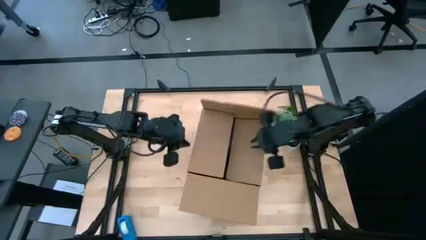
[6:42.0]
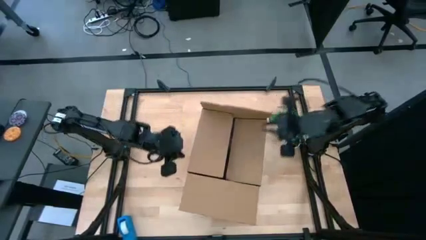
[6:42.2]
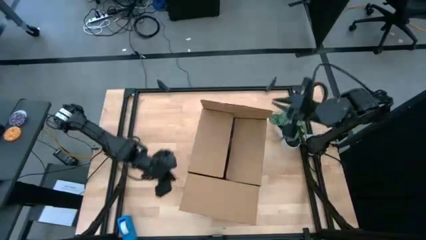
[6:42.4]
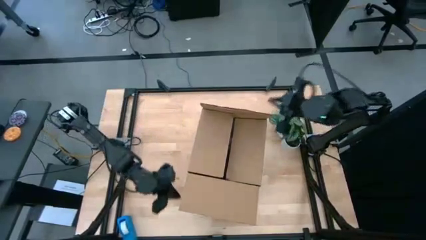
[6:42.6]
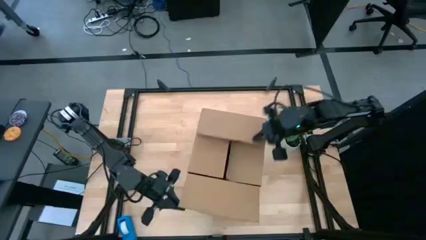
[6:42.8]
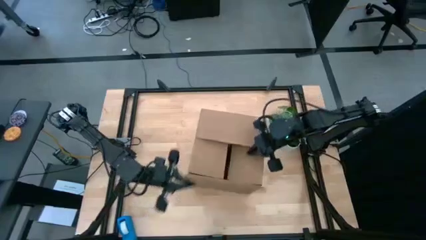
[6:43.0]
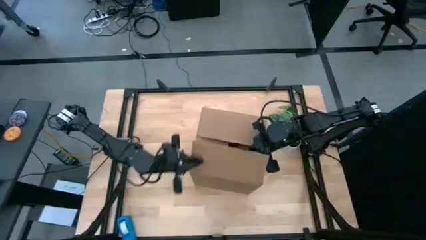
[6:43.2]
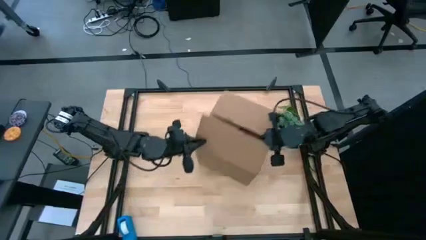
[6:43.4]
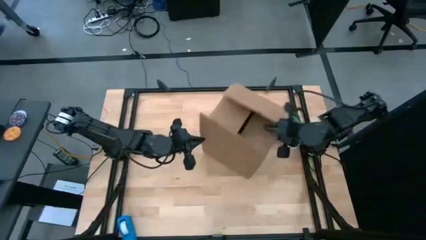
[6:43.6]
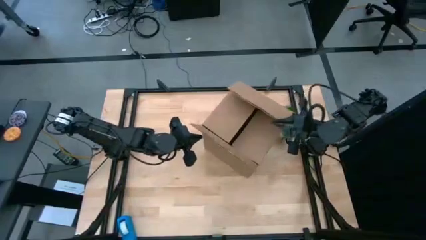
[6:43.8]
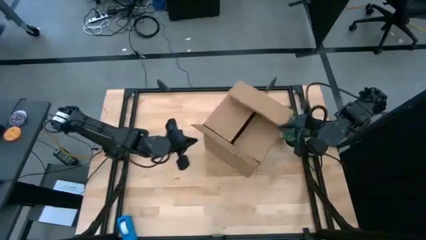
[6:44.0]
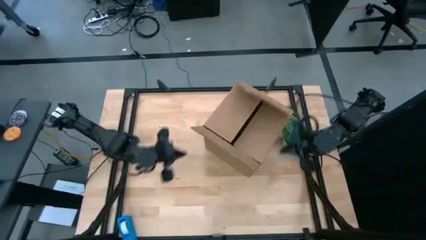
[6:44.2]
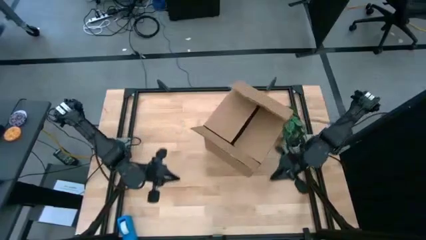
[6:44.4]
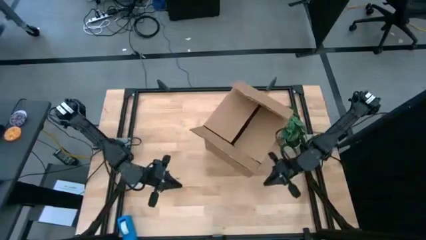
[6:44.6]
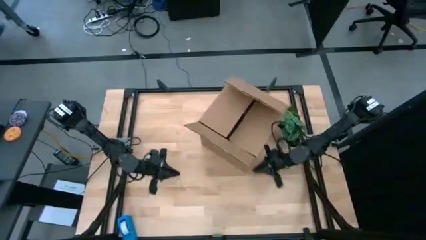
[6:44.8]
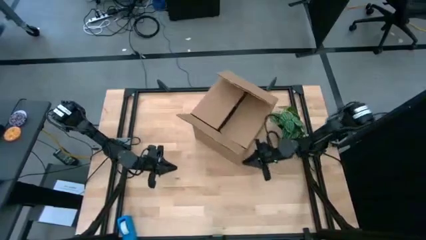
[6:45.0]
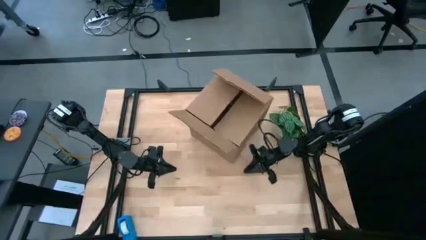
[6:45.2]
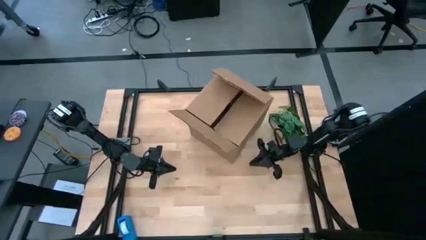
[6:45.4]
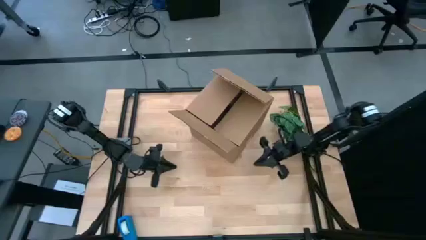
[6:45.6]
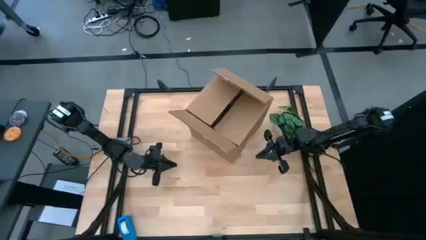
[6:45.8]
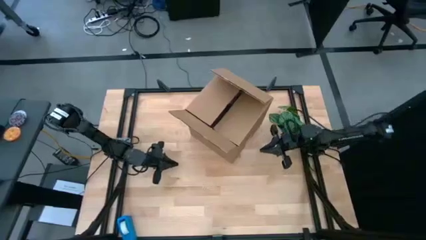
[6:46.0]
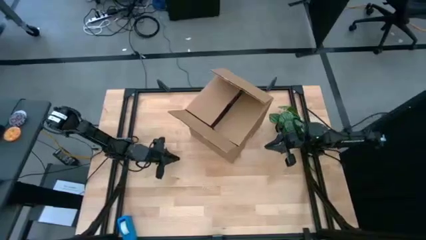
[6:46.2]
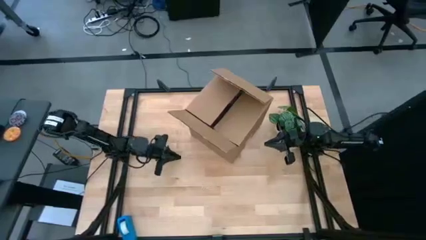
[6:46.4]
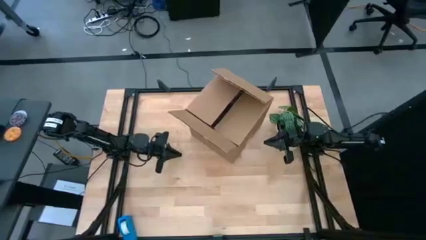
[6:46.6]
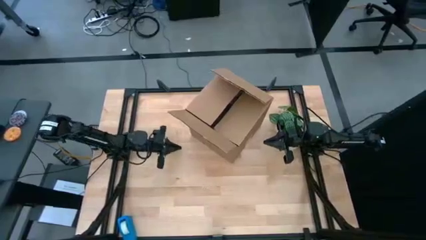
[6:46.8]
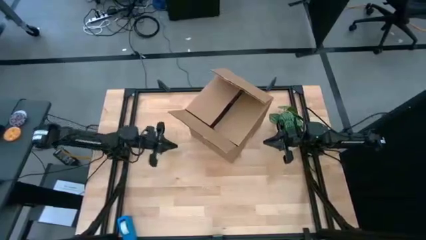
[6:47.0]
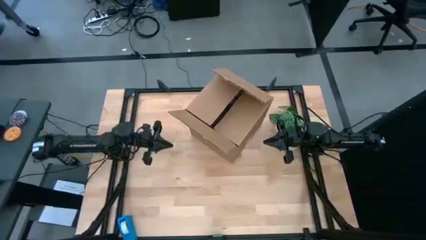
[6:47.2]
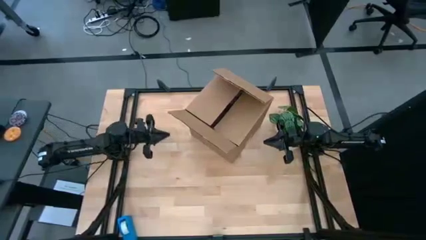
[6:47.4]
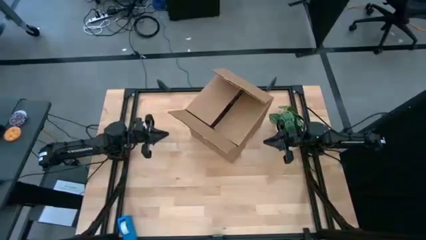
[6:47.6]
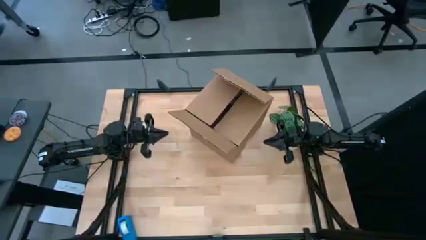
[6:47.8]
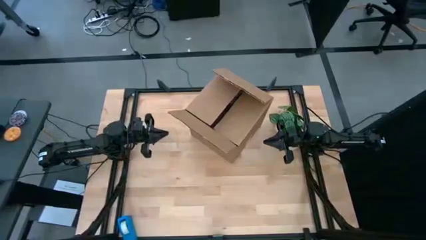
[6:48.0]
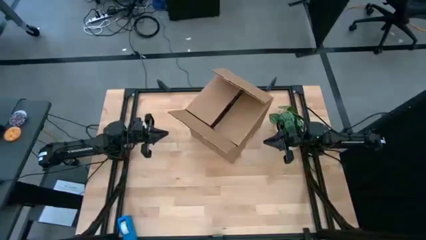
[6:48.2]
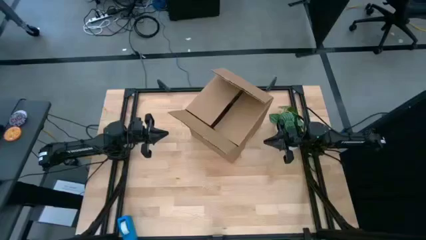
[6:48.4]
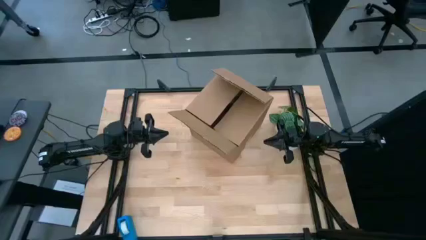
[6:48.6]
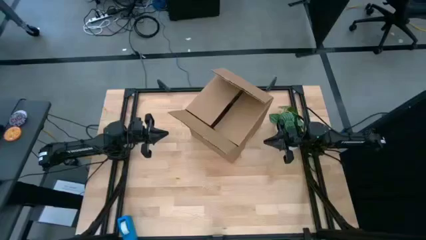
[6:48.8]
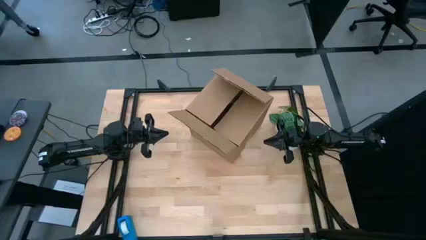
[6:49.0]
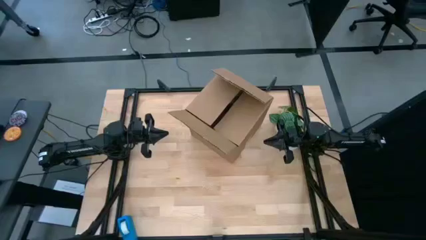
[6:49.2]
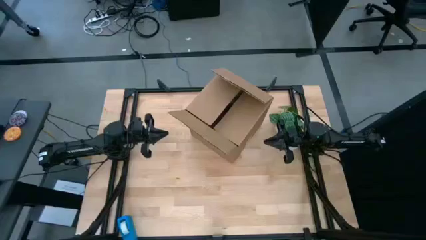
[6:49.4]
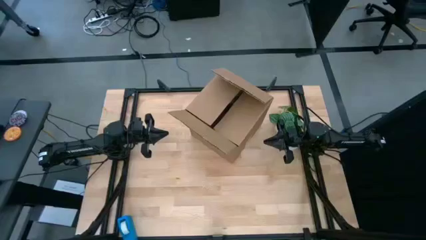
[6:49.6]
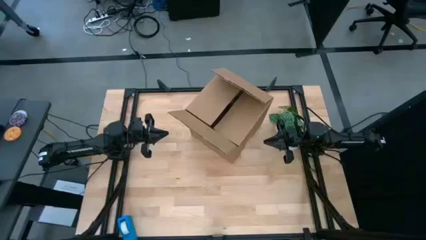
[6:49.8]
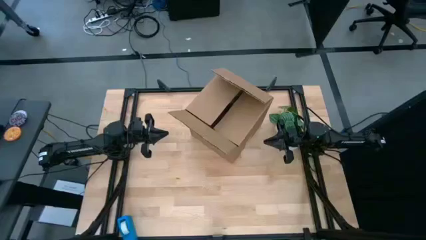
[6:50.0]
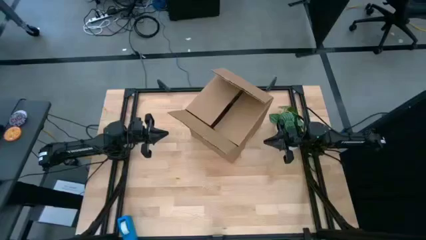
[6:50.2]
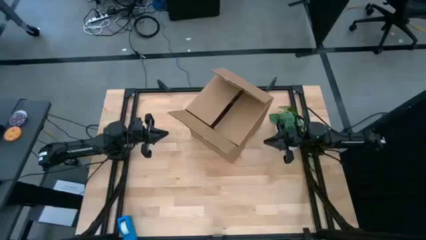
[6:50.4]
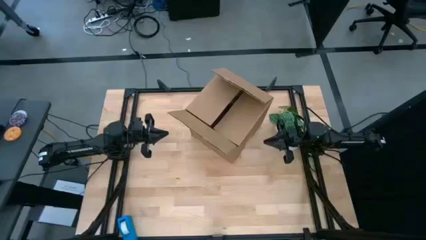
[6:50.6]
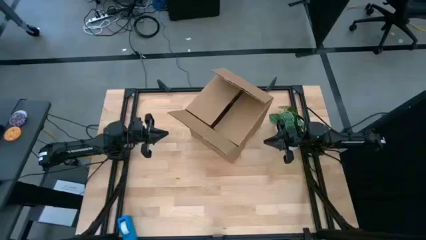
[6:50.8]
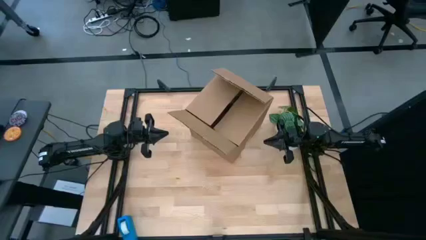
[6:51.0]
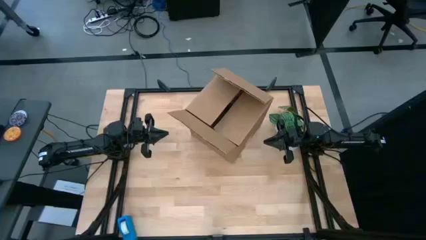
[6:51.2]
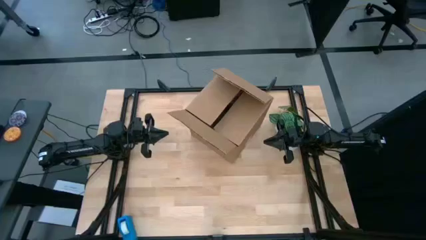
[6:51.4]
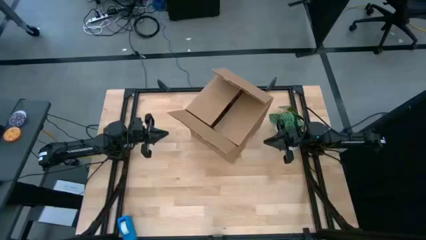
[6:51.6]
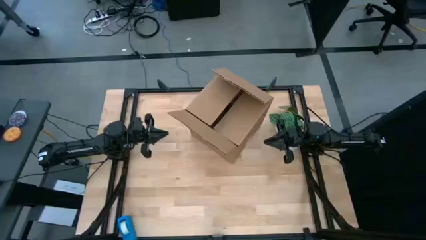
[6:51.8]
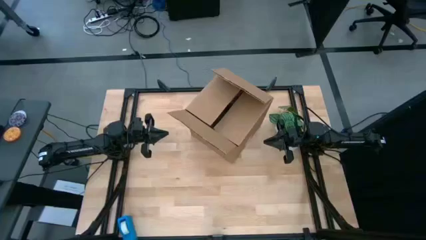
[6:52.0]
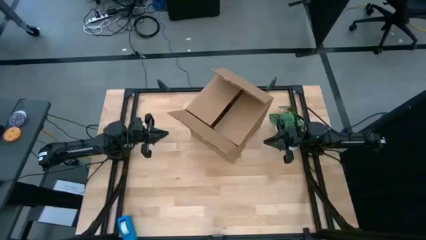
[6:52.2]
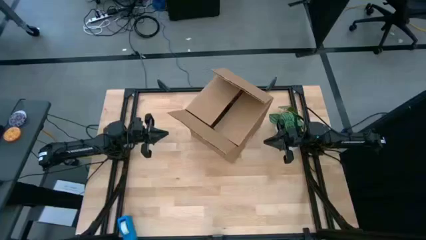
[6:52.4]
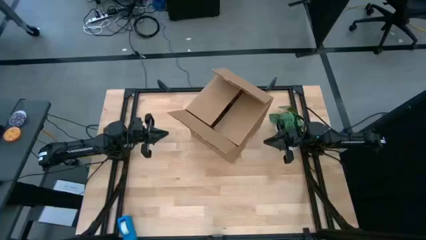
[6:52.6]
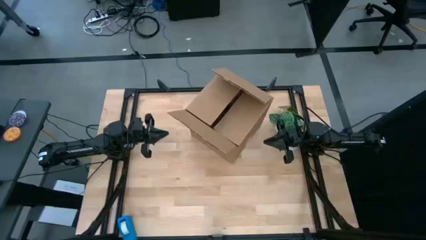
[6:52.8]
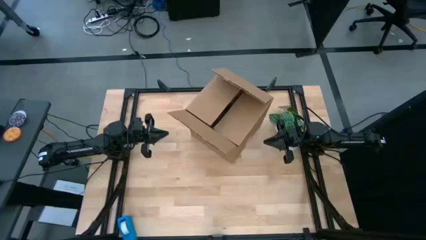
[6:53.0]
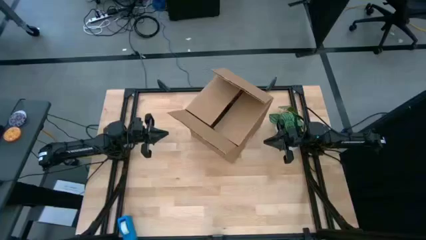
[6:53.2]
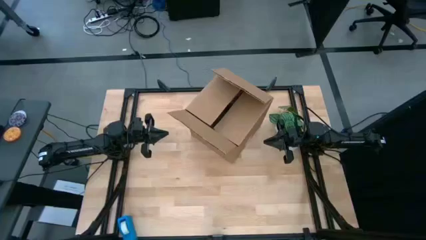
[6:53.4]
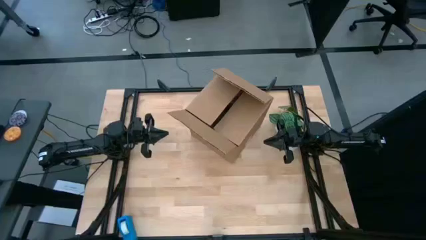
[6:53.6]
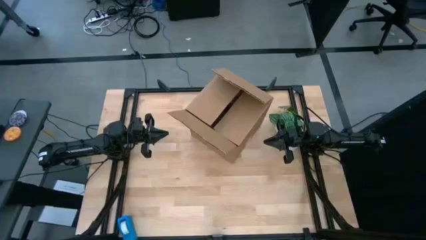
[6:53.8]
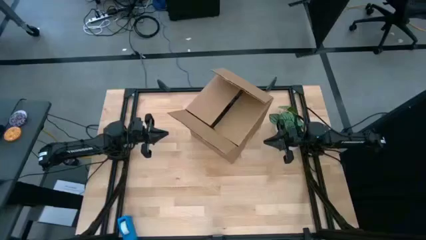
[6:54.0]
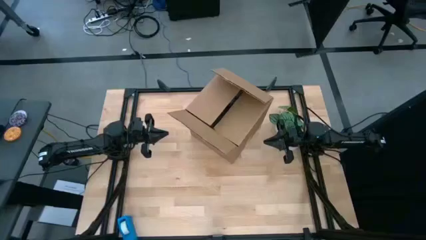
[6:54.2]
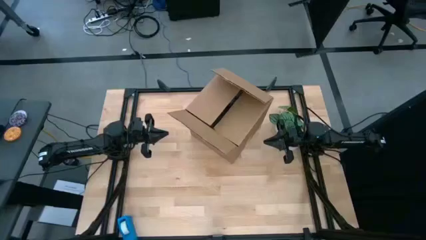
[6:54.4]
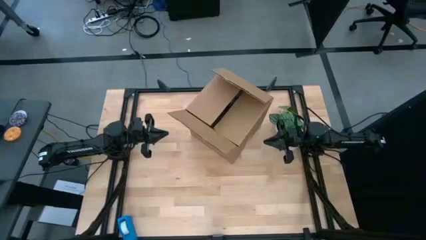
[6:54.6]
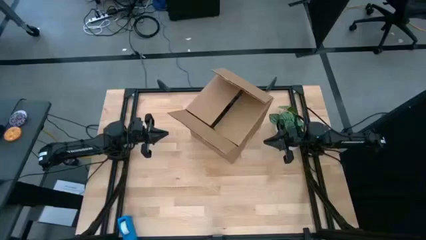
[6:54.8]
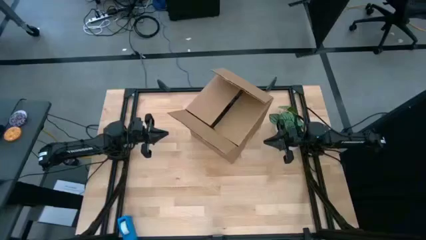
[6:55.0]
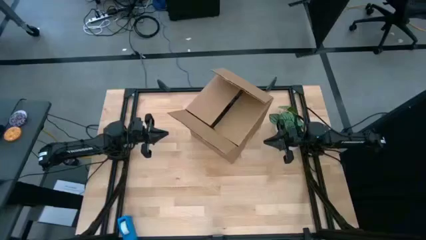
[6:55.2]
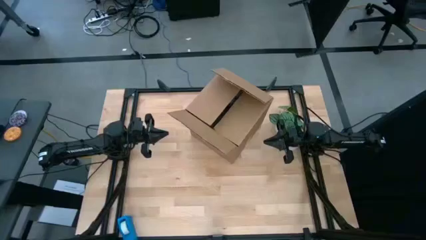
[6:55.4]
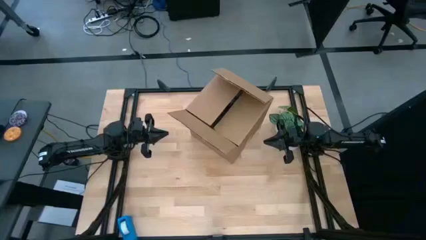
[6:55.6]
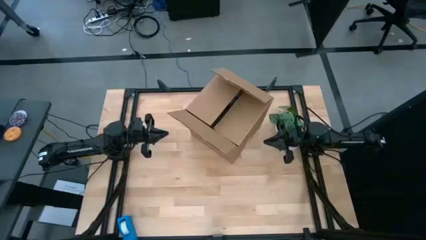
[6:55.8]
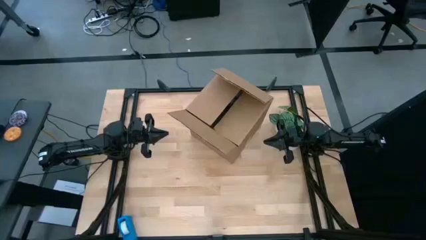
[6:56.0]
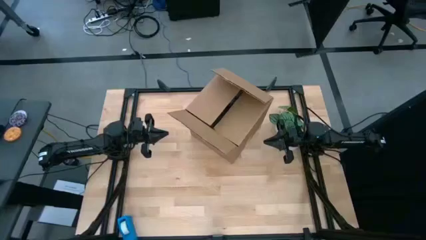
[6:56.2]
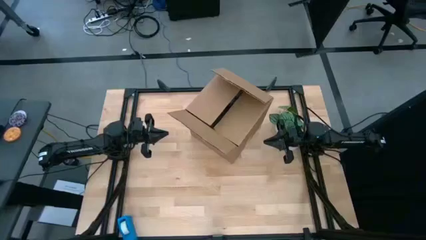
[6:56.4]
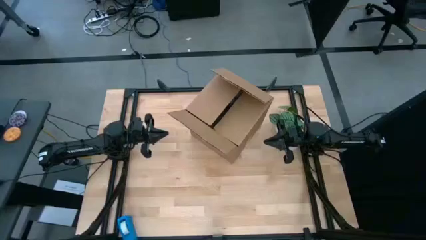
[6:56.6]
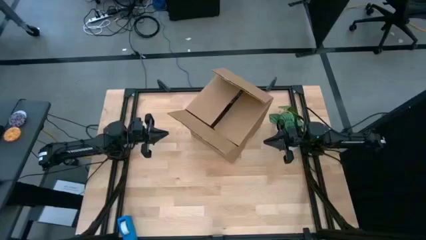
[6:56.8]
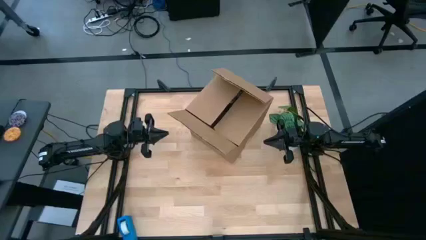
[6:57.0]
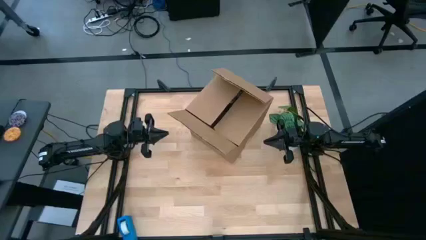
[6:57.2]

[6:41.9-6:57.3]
Task: wrap mug
Return to Home Position
